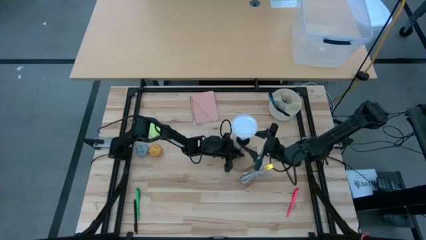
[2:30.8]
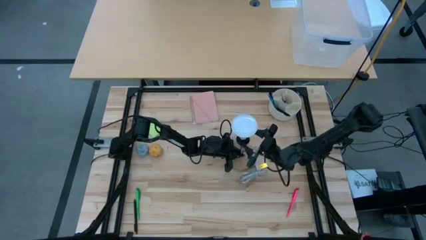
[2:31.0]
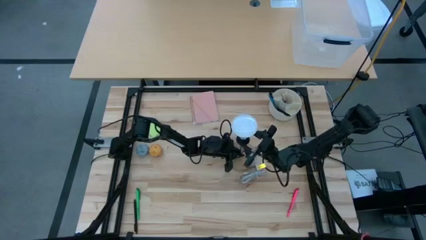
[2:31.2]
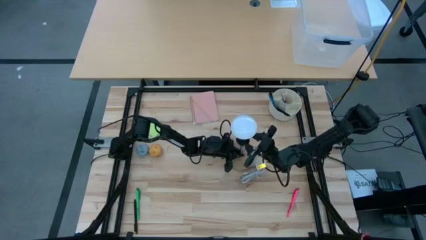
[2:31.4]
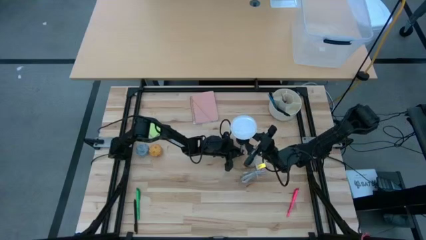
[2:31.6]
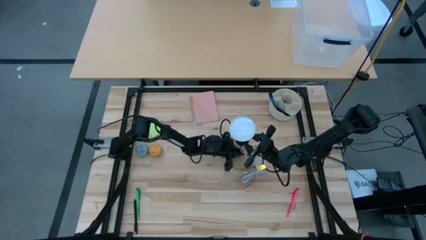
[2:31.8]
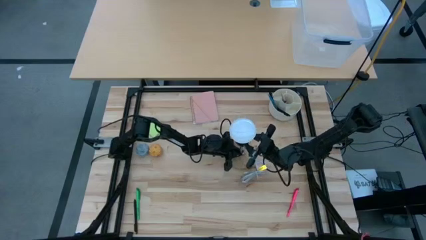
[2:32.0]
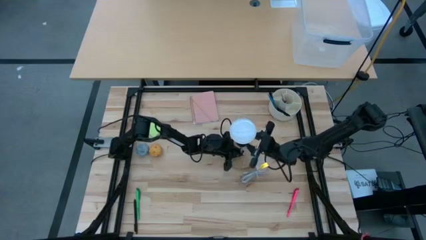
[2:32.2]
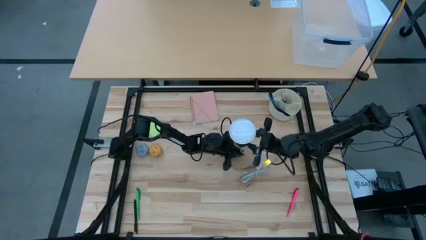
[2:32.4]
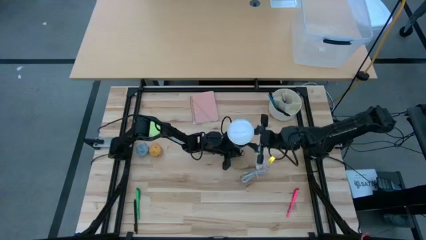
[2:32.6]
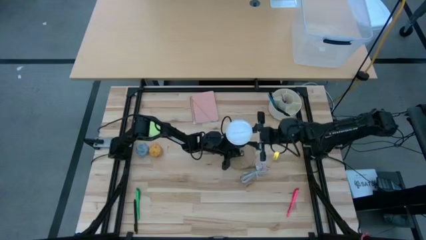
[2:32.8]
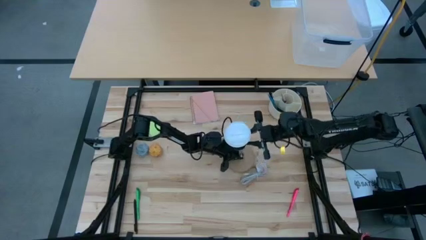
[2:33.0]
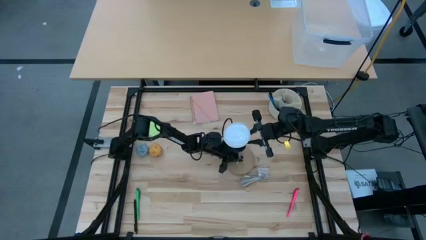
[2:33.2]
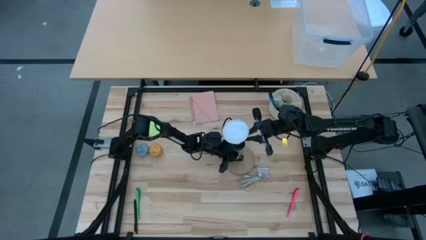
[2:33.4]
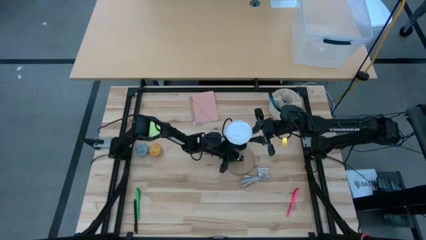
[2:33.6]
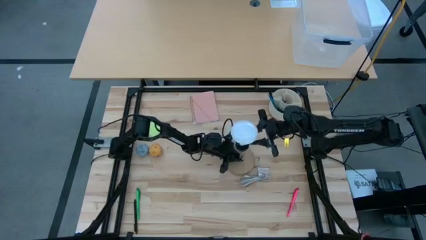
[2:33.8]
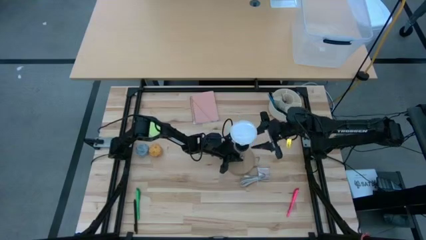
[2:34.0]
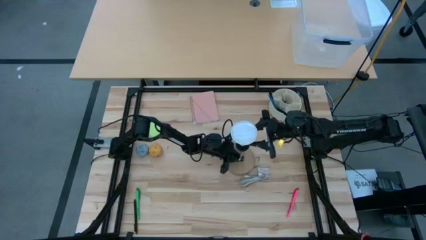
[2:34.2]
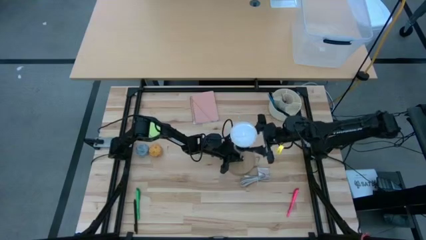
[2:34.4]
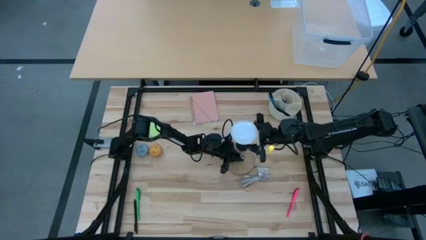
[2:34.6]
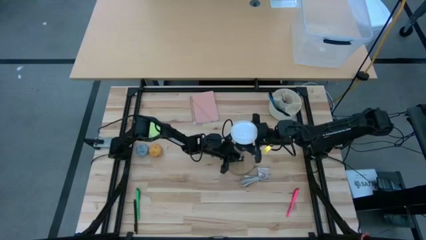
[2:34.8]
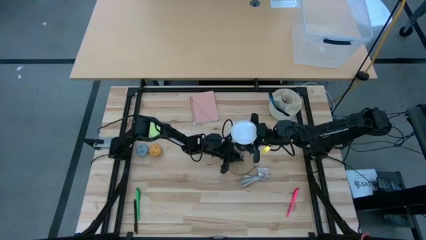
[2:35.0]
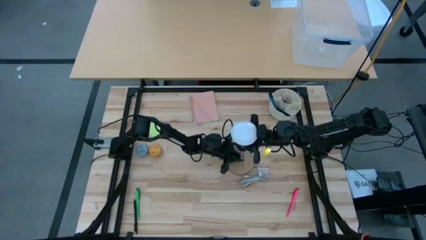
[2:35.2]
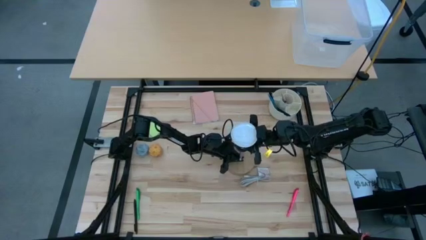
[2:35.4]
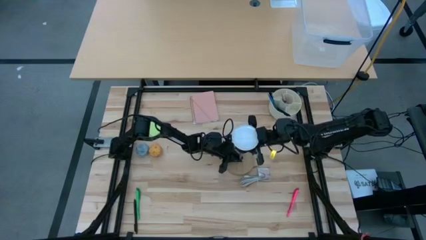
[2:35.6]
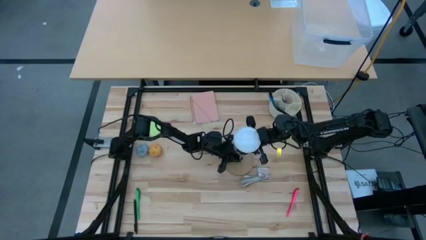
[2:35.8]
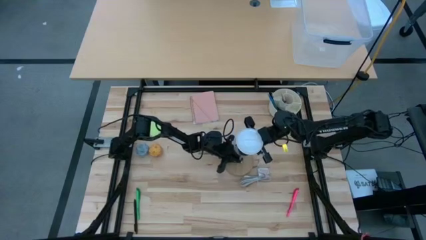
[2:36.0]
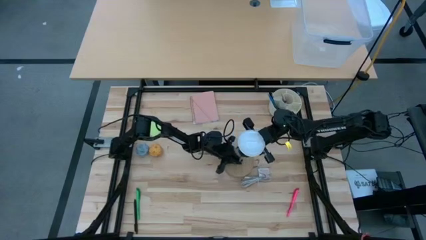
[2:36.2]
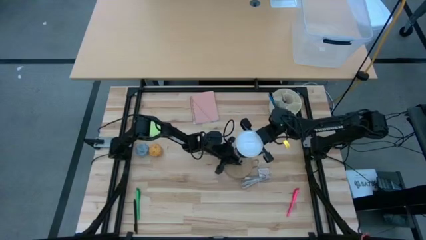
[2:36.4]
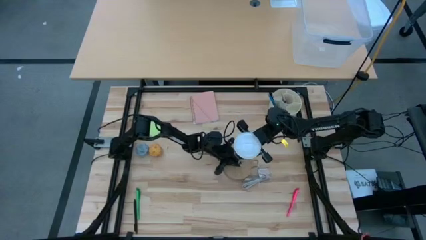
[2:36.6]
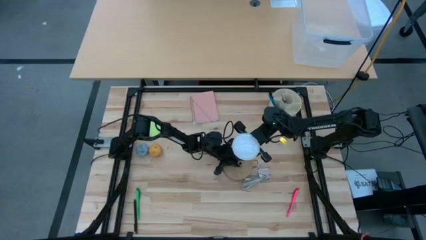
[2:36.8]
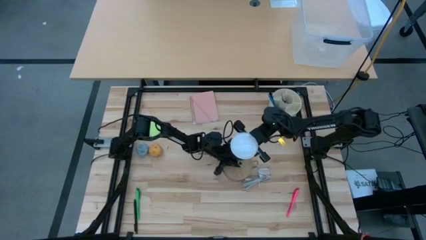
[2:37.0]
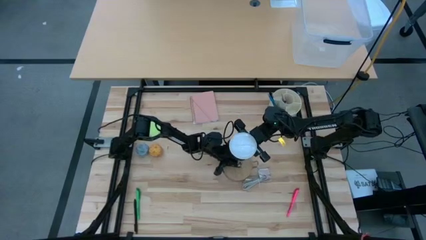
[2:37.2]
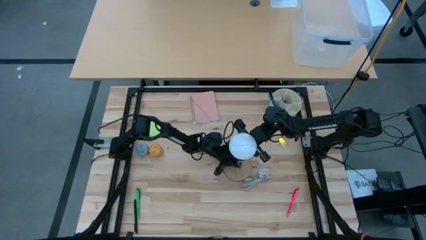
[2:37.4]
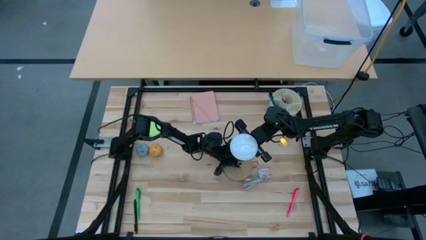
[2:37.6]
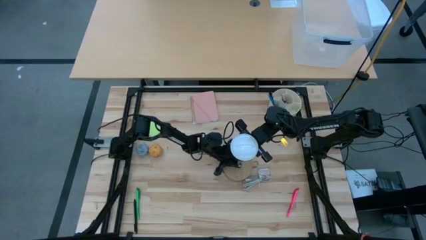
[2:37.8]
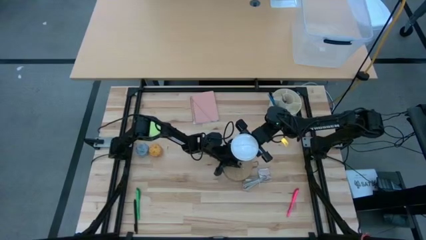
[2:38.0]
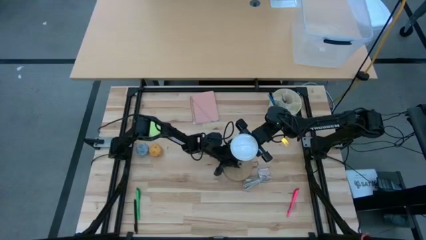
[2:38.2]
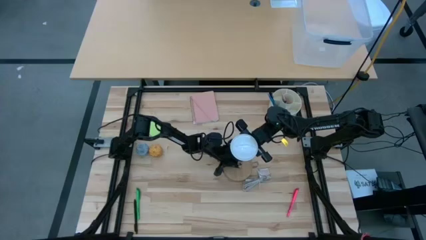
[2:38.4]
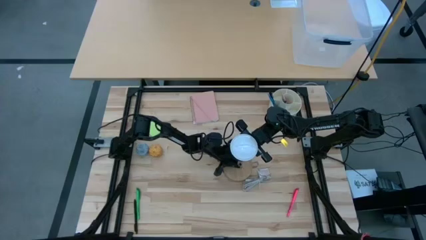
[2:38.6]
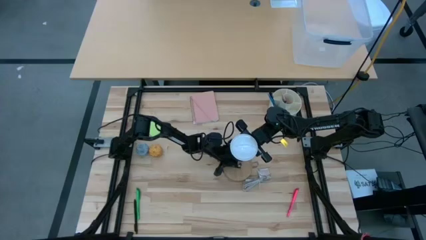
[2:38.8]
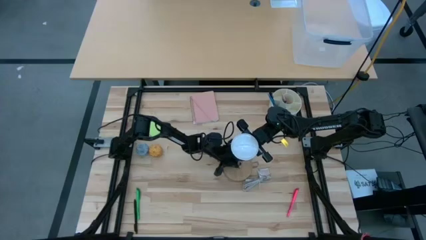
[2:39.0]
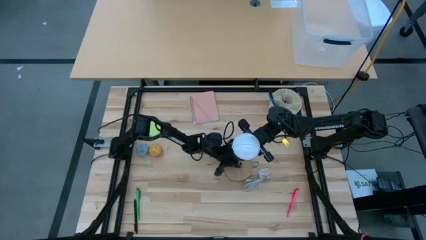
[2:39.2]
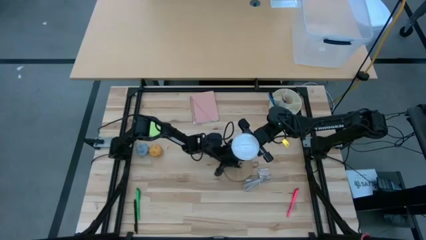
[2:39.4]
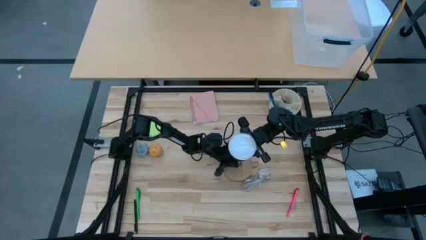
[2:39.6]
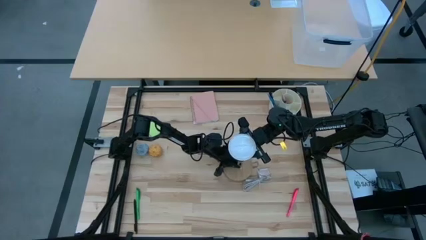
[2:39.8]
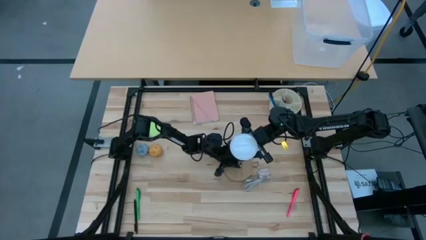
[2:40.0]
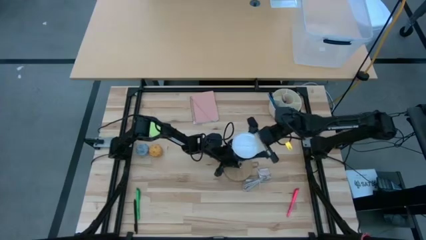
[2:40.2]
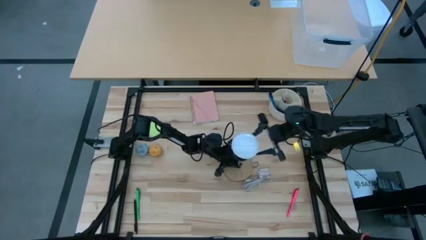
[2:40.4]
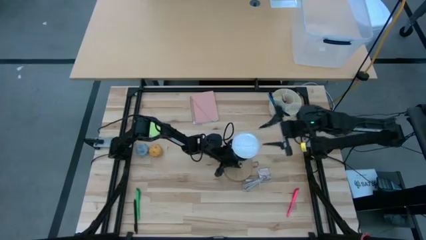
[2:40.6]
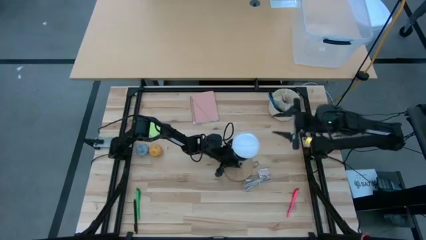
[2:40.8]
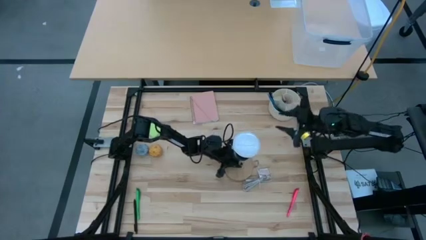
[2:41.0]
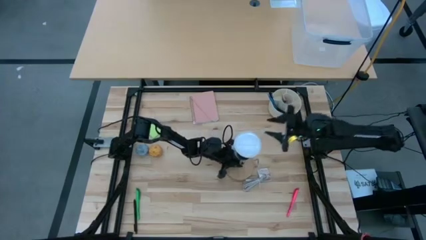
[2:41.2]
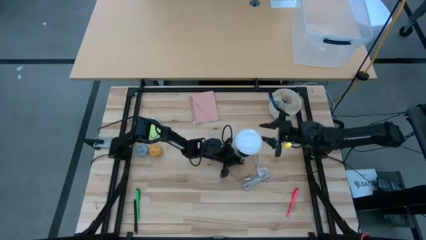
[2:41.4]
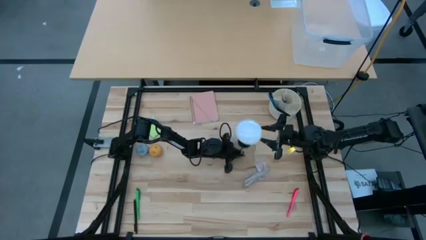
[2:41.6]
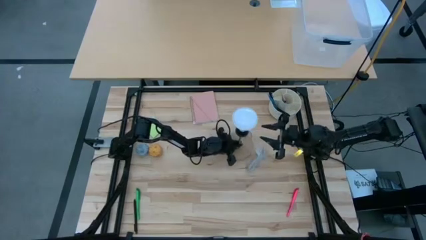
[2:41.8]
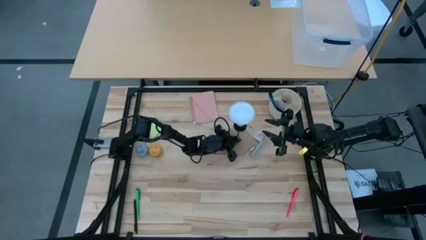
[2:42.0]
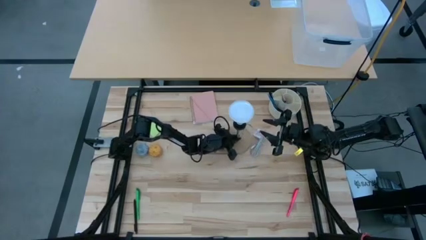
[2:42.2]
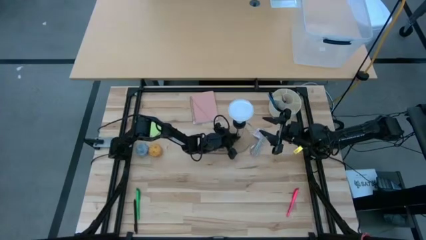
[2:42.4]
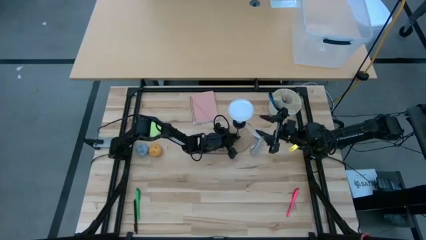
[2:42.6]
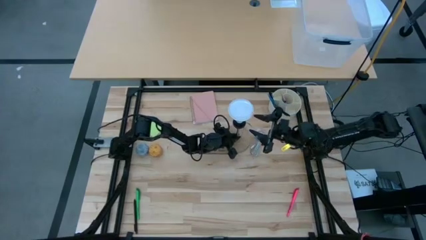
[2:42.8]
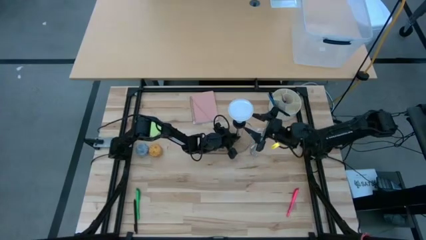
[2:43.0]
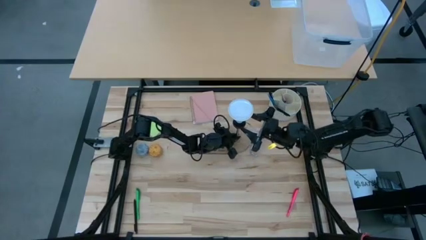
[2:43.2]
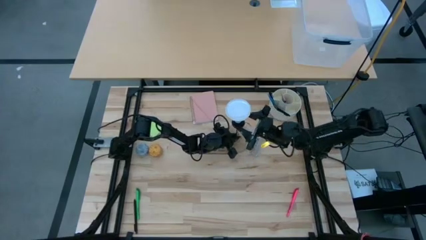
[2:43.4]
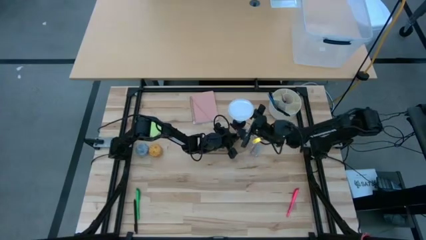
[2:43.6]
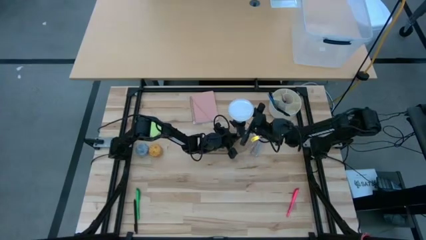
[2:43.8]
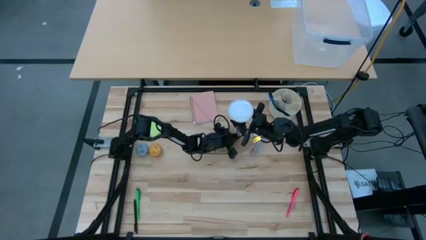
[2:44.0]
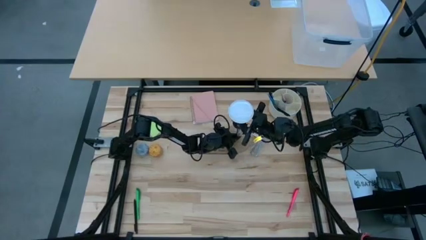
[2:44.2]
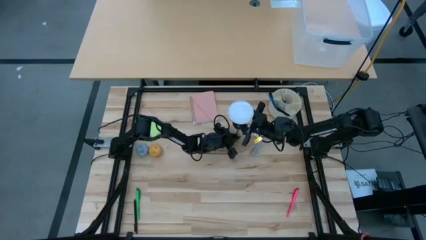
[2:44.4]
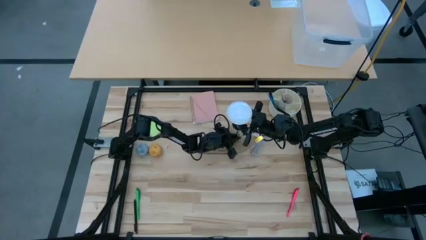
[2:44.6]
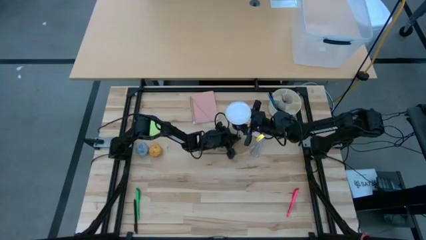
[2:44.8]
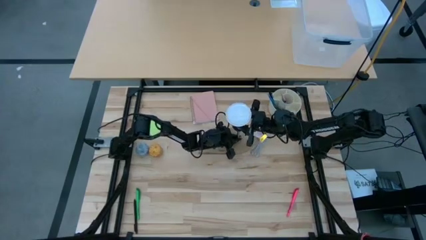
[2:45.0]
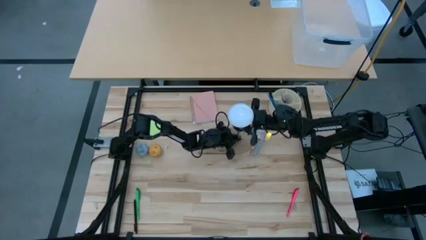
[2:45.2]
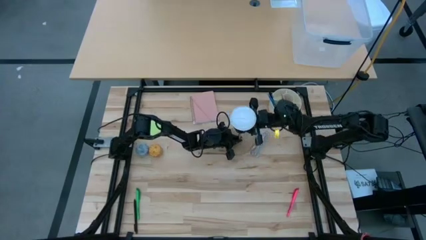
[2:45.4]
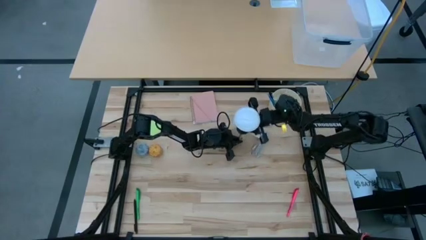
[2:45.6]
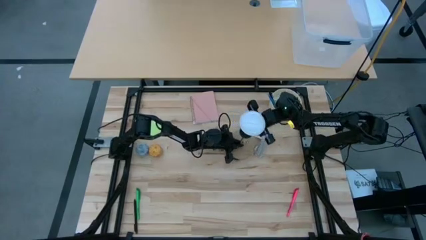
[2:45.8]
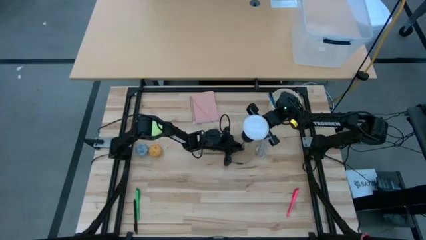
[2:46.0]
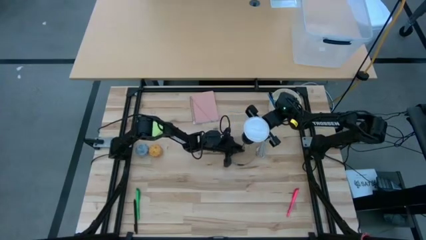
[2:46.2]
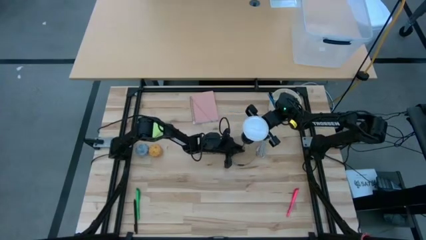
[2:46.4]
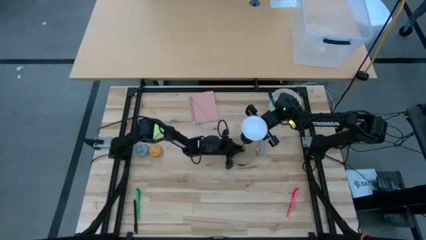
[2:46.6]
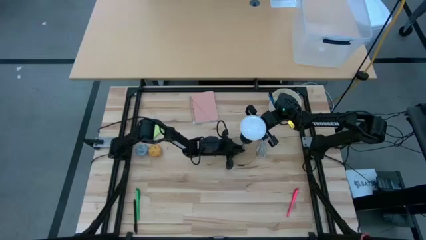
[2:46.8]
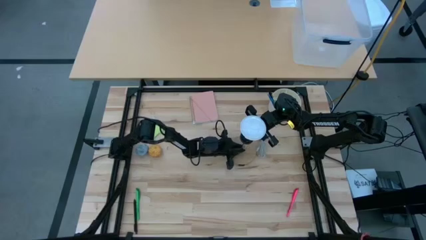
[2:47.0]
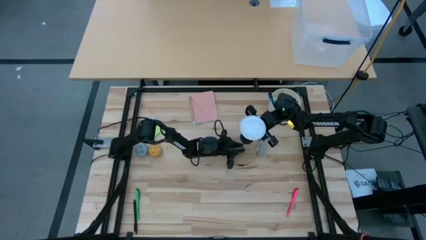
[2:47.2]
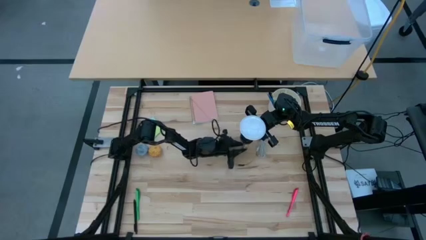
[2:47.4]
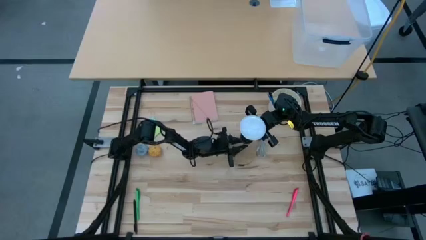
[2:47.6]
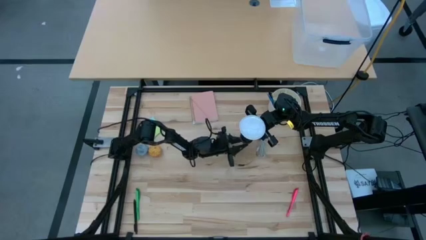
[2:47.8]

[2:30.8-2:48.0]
Task: Screw lightbulb
Remove the lightbulb from the lamp
